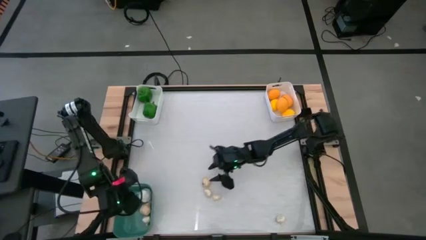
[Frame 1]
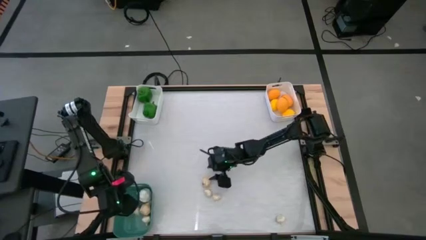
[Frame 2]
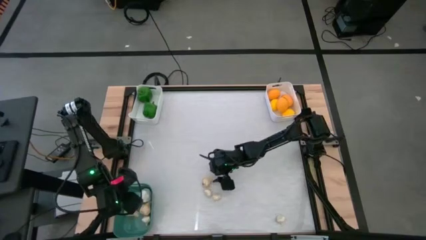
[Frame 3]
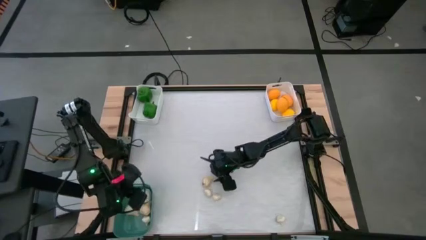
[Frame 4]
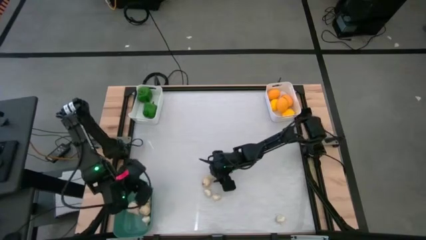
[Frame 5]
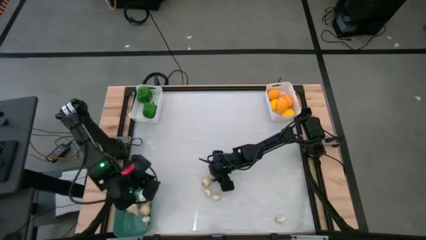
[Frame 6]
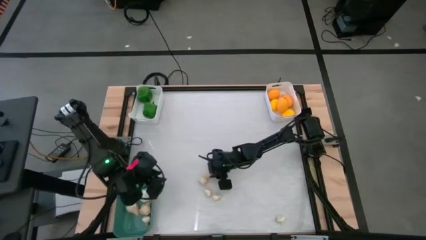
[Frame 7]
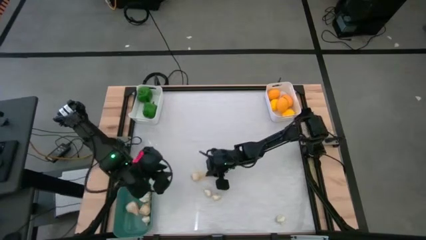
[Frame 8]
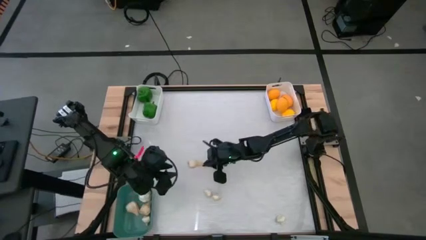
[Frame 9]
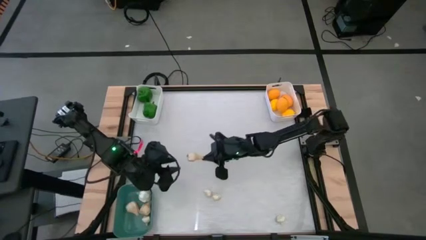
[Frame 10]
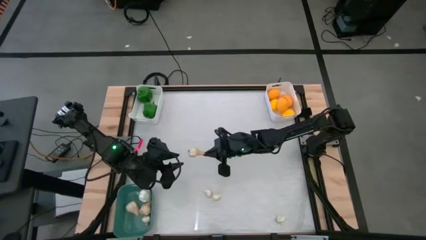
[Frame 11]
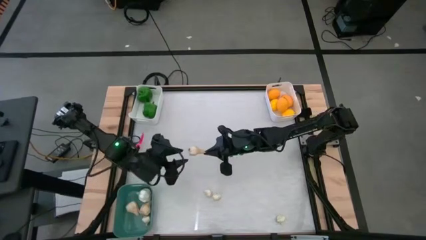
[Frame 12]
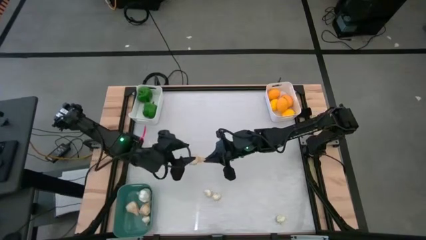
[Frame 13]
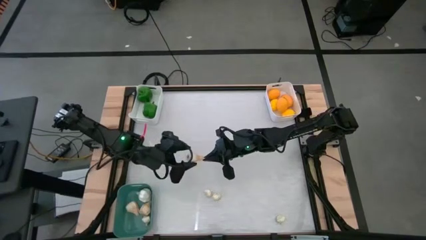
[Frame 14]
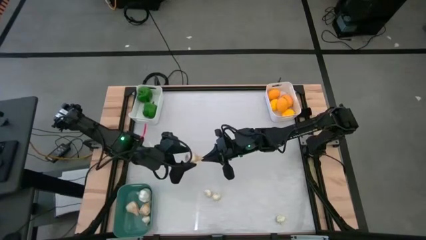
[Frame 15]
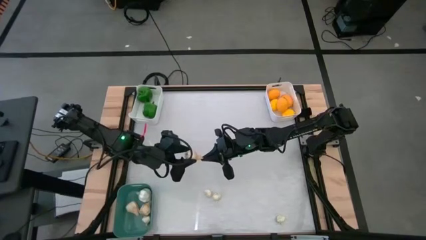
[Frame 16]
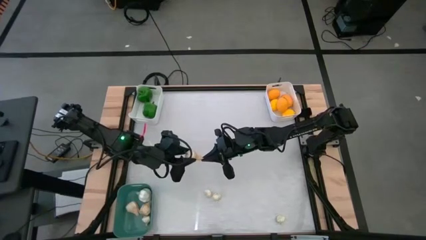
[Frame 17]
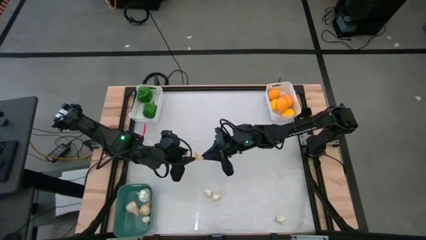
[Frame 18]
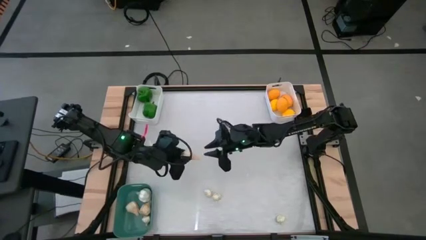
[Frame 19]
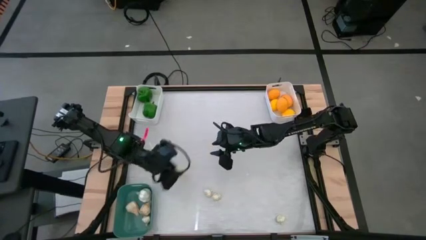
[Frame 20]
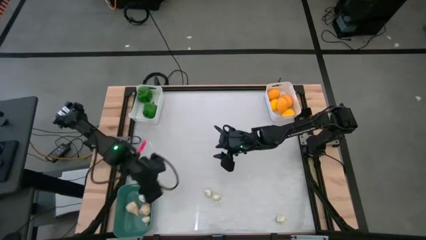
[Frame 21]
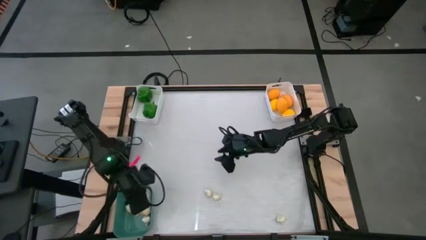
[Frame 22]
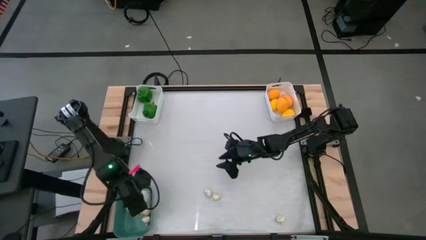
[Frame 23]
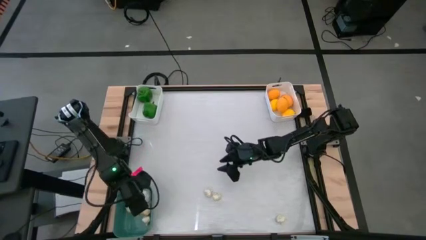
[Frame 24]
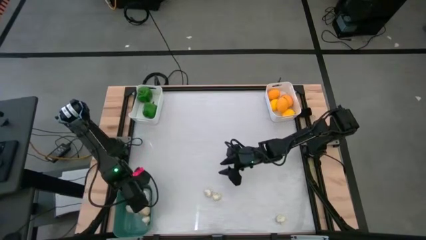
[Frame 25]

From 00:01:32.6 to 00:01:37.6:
Task: Sort produce into baskets
Put the white garlic into the green bin

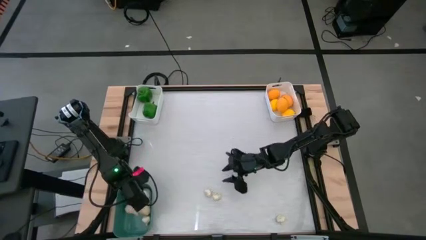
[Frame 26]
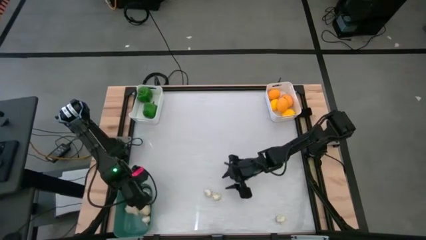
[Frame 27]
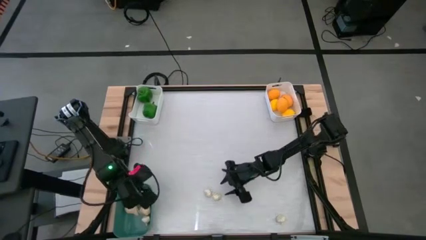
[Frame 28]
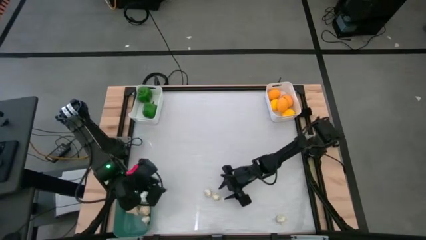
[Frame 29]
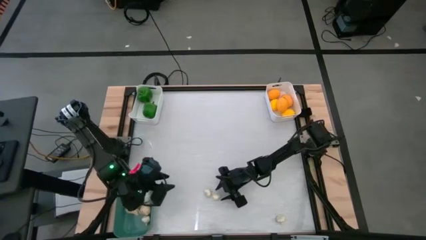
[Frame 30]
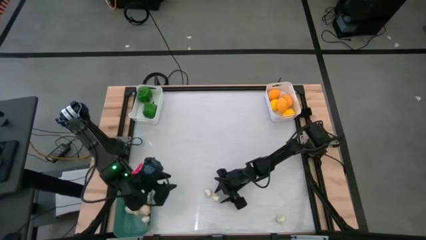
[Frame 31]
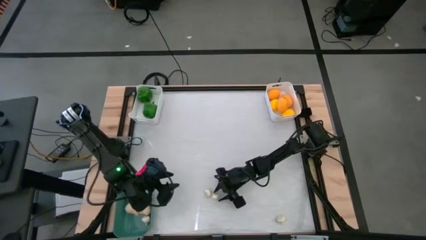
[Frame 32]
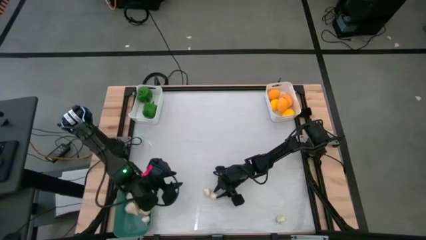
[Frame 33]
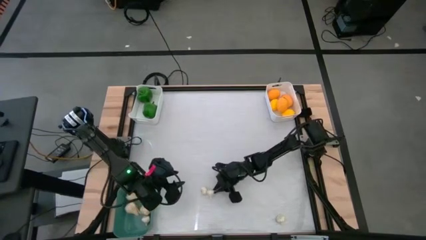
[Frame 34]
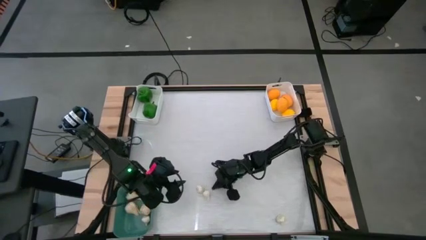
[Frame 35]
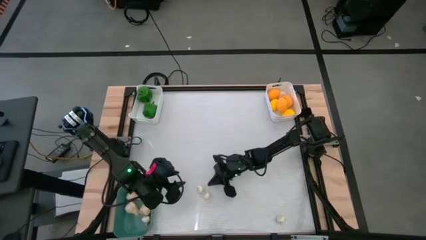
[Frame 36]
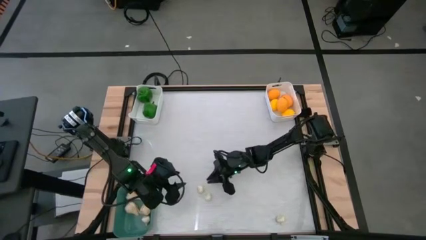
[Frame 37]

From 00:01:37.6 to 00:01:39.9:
Put the white garlic into the green bin

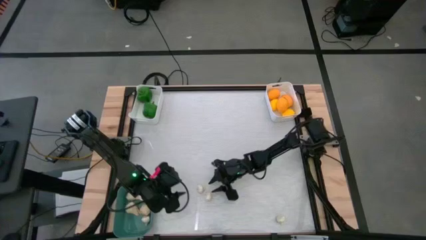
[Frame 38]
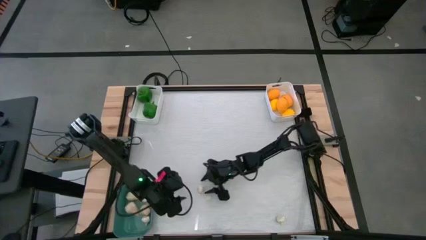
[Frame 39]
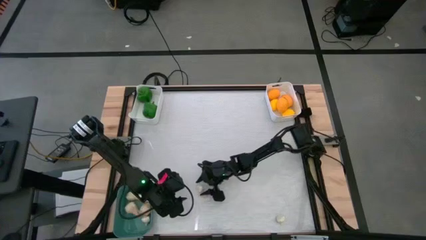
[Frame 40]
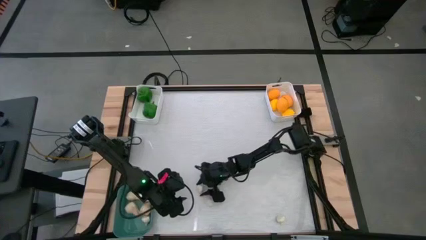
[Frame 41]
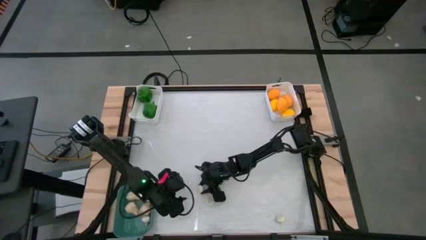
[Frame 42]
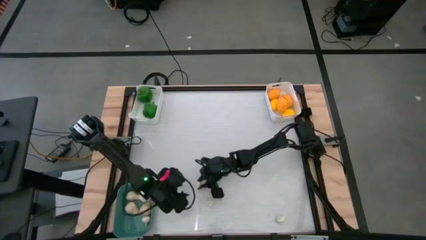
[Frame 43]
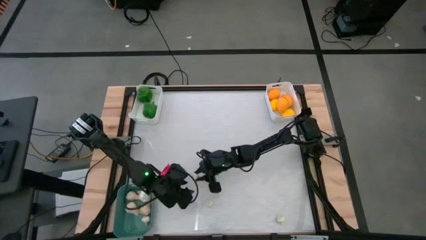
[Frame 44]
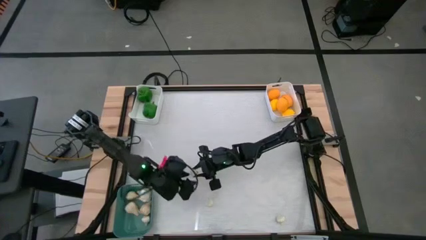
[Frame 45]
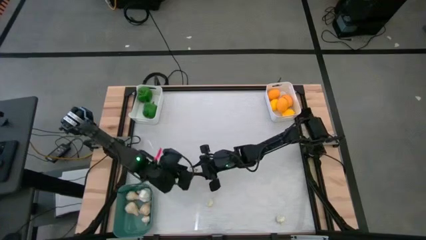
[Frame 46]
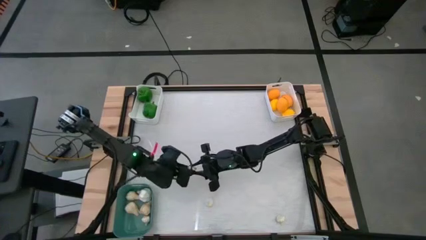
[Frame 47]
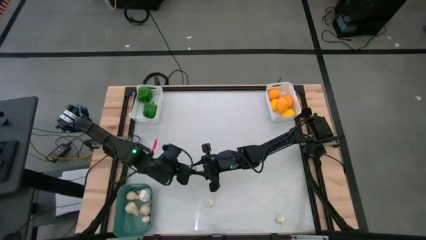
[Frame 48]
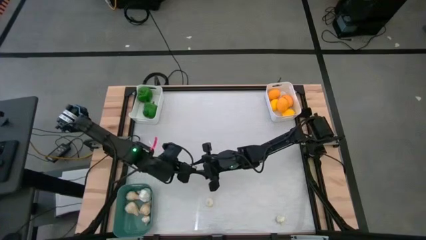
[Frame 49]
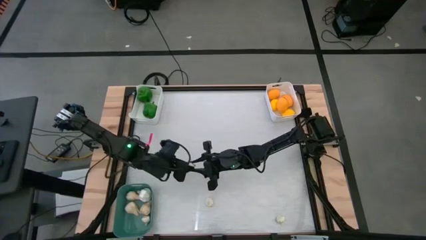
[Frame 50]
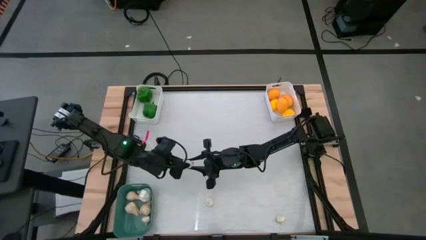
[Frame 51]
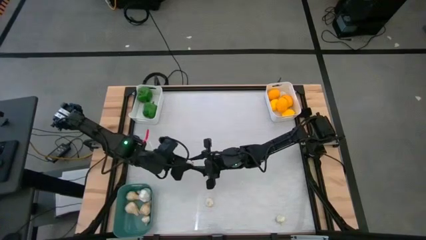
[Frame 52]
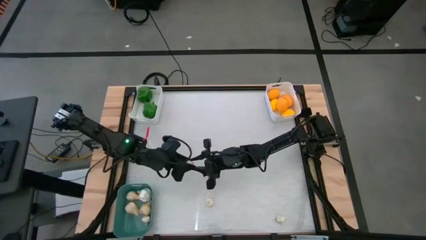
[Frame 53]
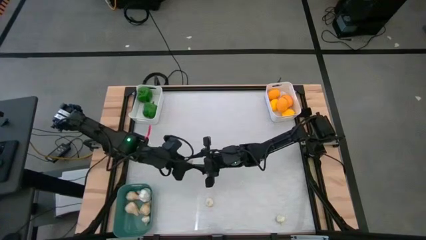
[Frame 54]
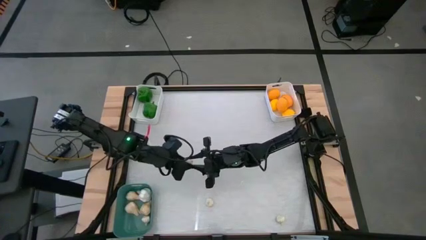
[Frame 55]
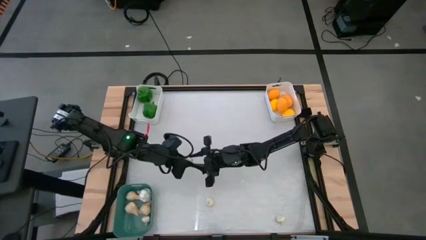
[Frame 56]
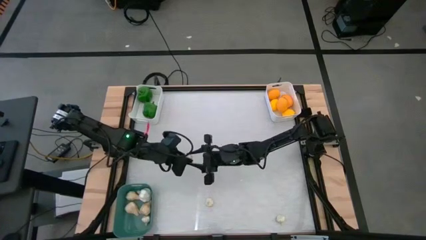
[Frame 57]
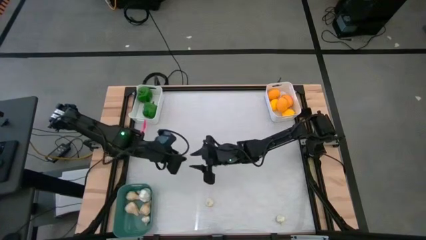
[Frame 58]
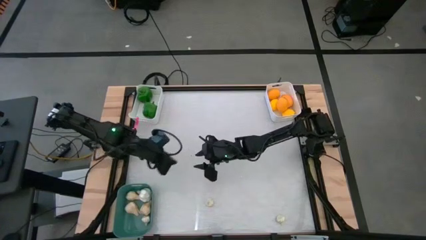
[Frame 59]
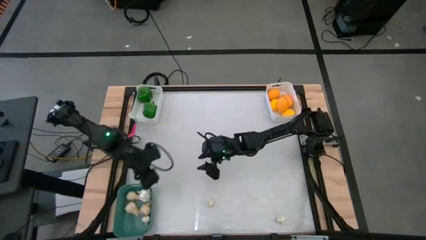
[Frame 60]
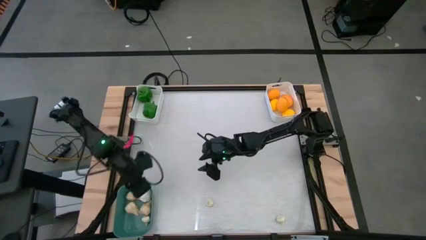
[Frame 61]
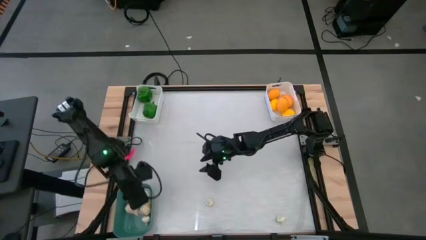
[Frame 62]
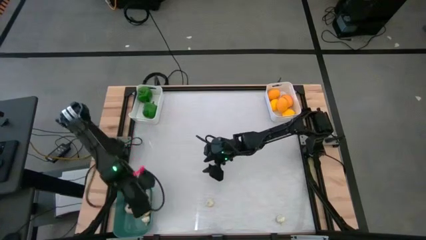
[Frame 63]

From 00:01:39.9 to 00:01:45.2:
Put the white garlic into the green bin

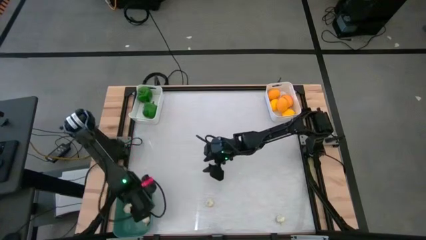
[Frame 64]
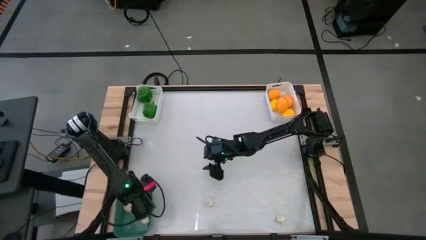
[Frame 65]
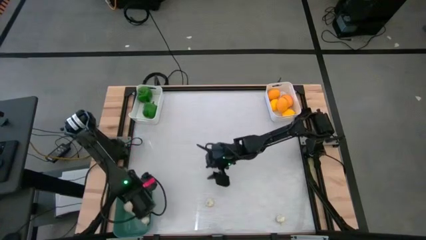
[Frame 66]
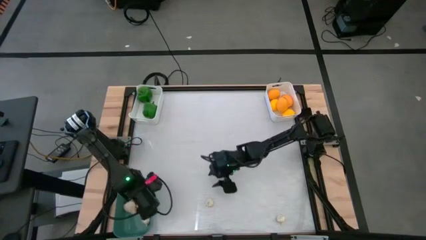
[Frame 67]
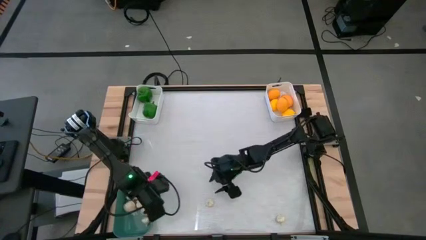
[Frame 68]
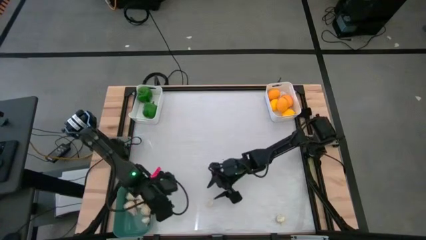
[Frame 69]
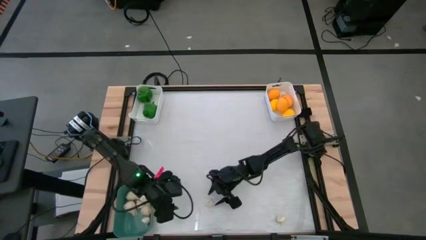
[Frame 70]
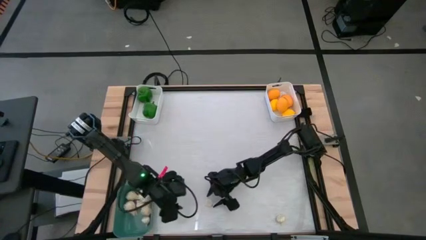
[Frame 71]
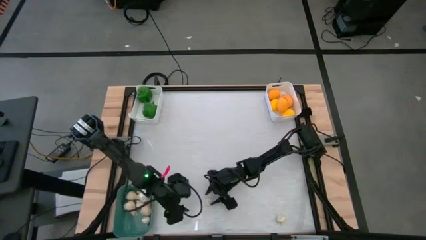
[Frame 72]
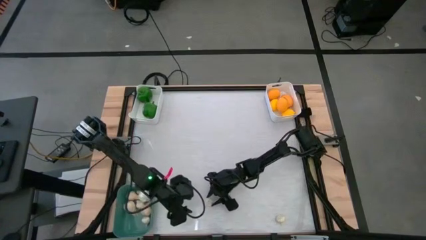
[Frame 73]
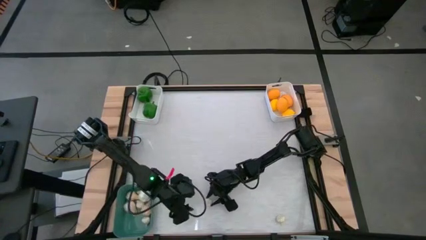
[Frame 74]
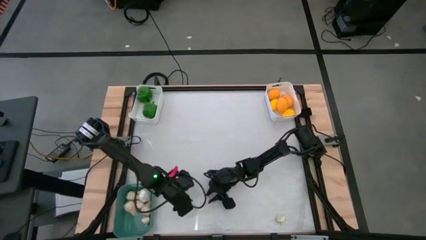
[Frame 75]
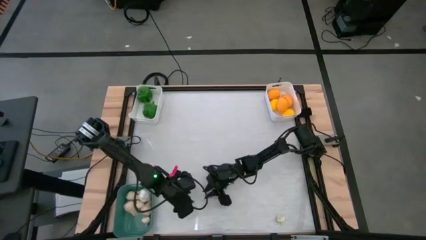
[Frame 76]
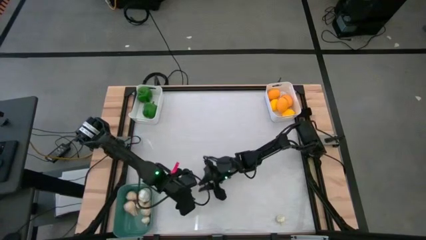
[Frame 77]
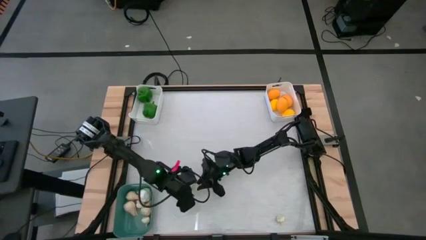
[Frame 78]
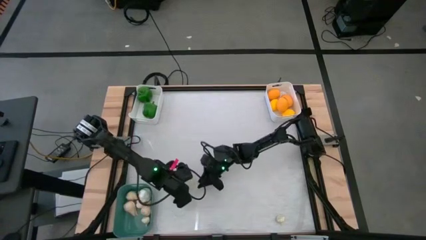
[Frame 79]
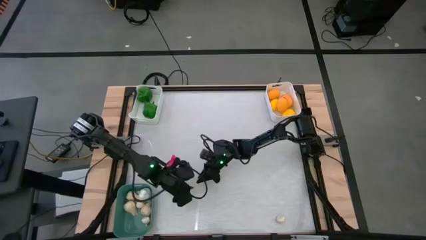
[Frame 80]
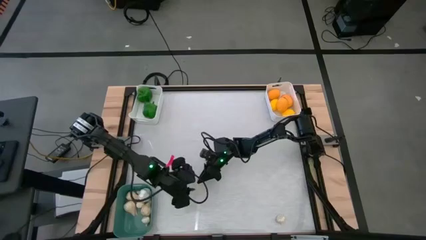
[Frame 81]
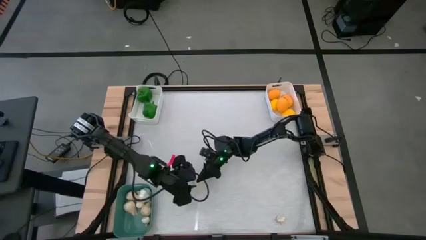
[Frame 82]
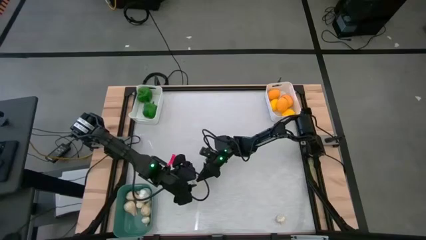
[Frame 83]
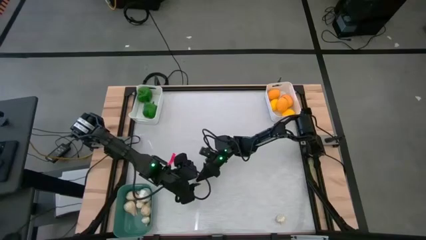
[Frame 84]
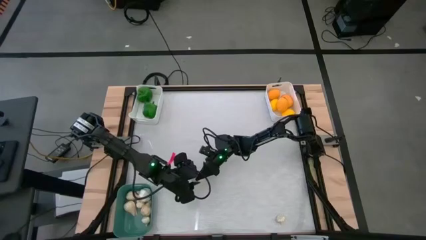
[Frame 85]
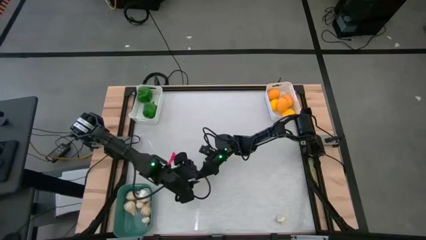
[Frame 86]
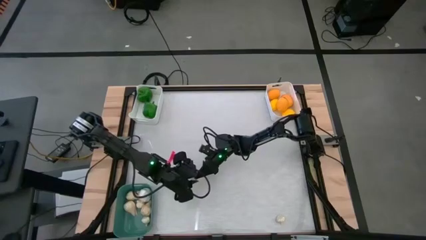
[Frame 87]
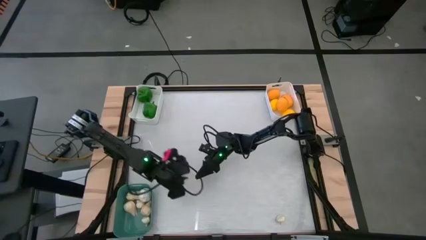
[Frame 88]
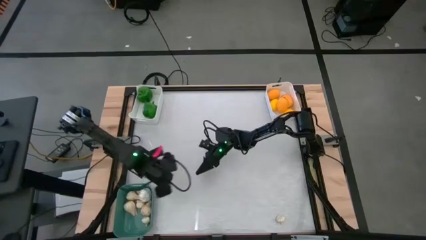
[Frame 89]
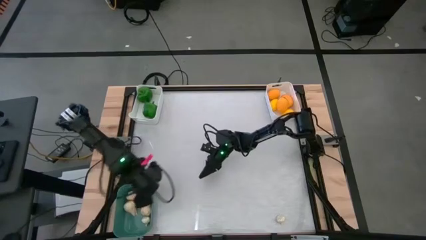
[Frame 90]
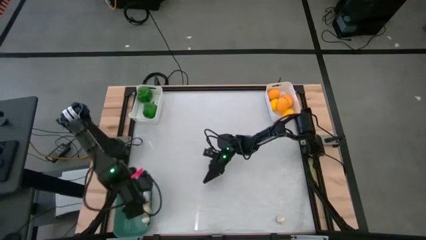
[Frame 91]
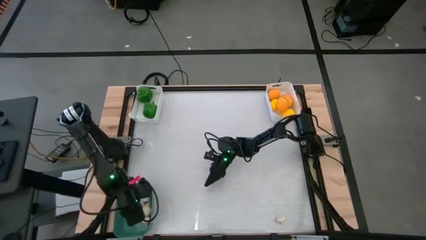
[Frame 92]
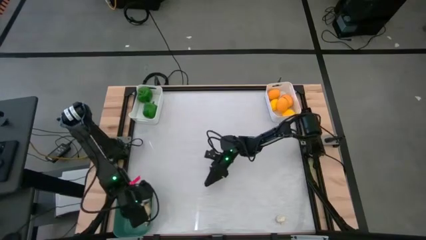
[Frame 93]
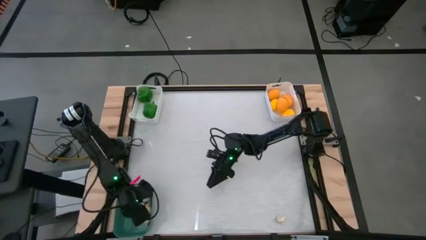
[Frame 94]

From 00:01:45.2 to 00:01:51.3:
Put the white garlic into the green bin
